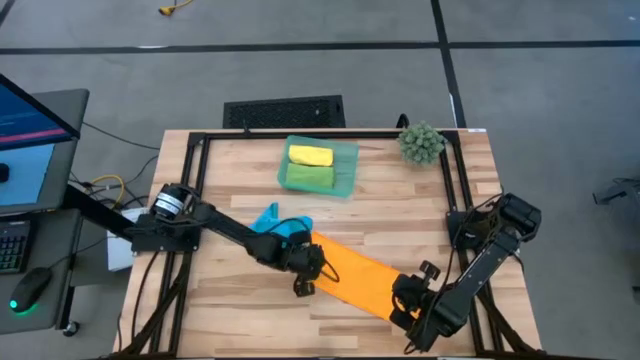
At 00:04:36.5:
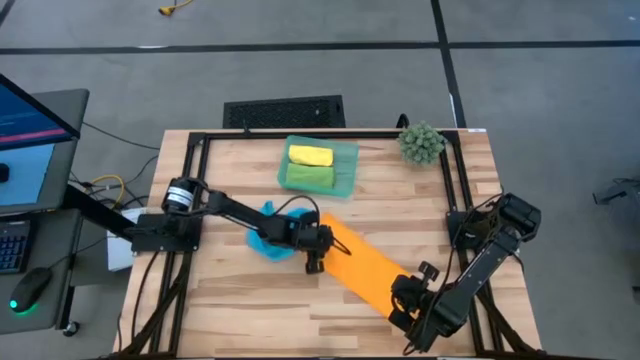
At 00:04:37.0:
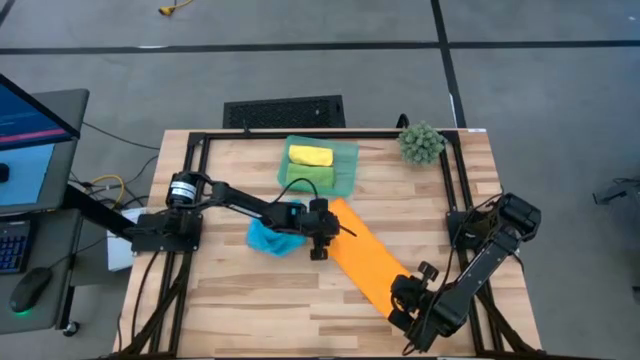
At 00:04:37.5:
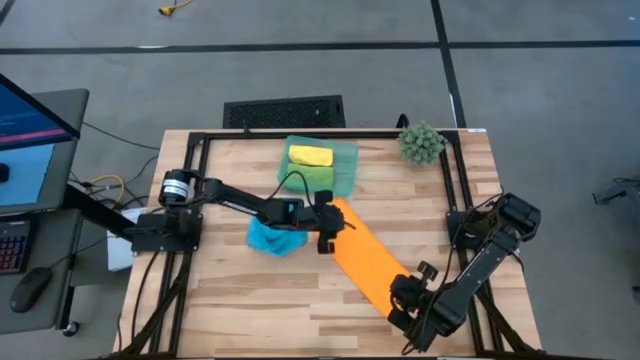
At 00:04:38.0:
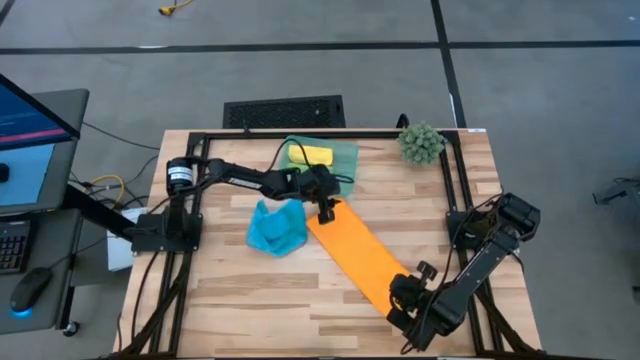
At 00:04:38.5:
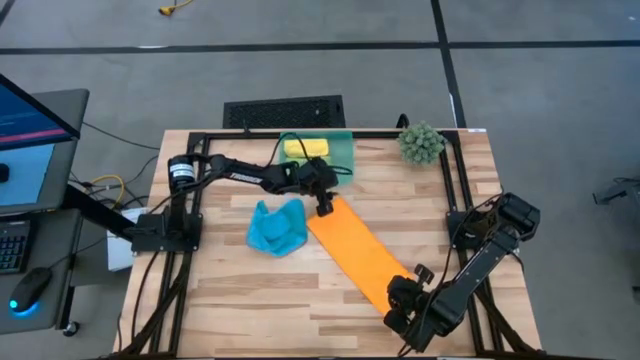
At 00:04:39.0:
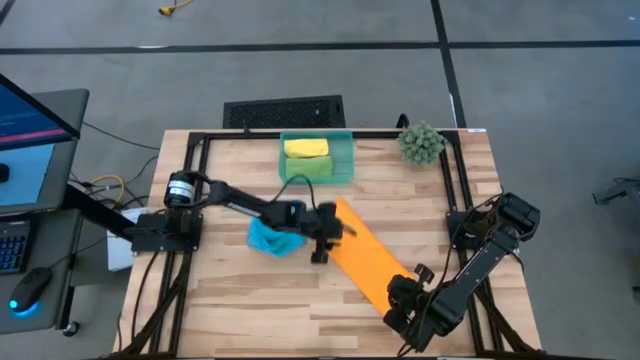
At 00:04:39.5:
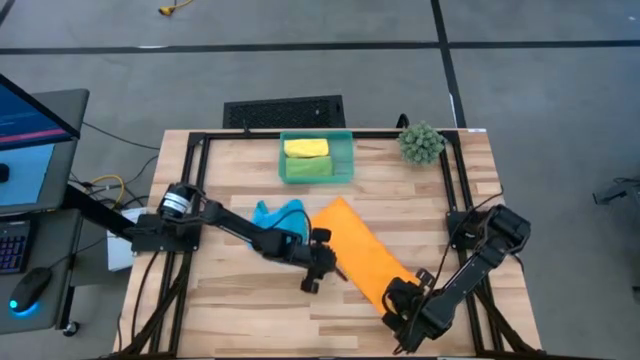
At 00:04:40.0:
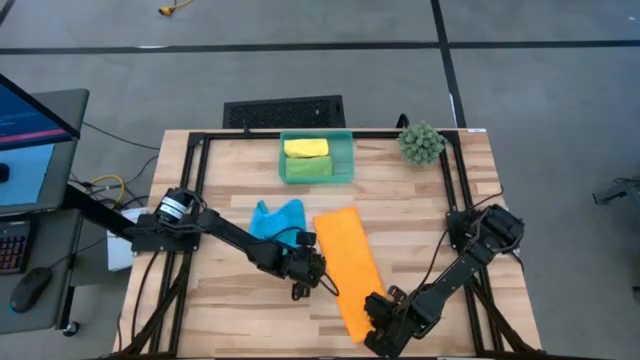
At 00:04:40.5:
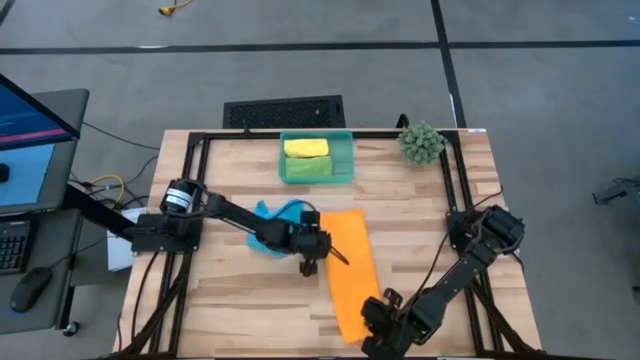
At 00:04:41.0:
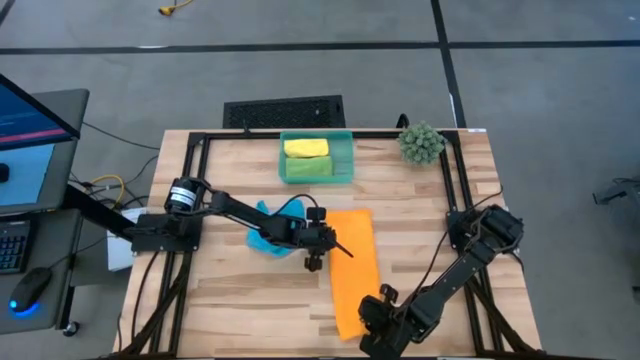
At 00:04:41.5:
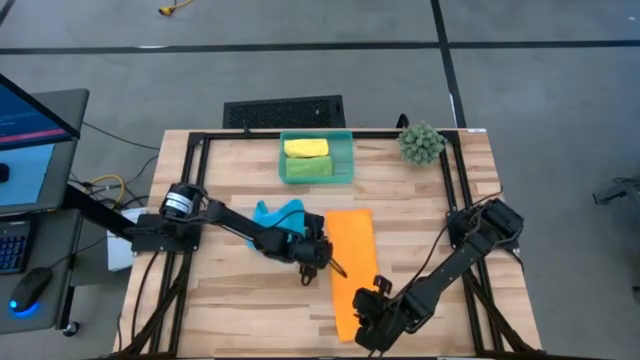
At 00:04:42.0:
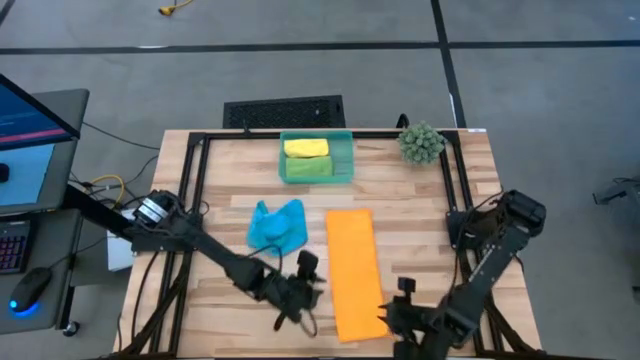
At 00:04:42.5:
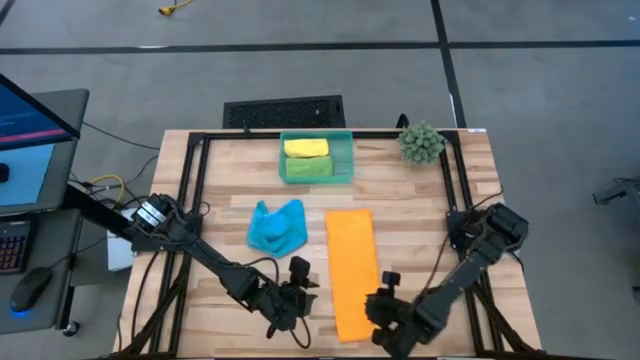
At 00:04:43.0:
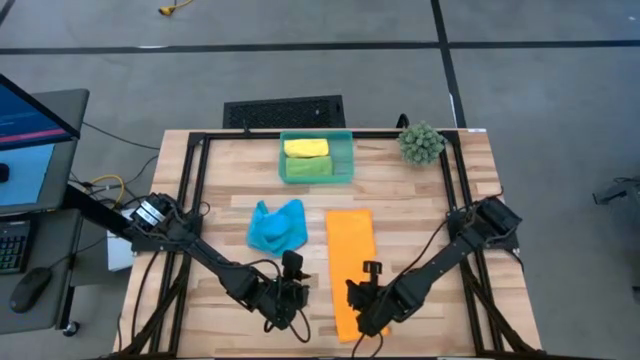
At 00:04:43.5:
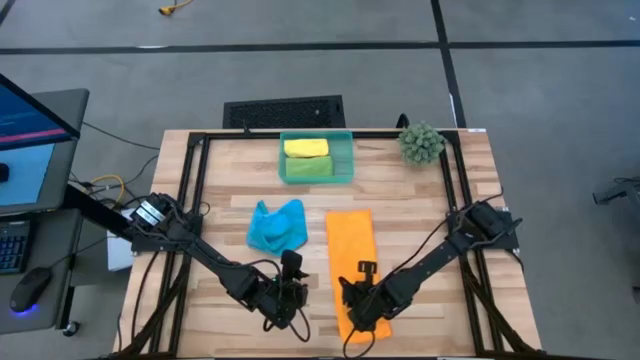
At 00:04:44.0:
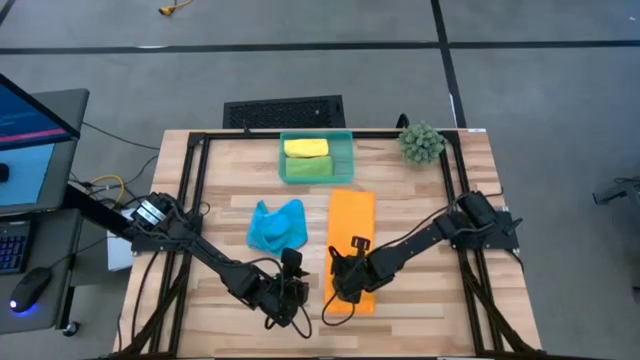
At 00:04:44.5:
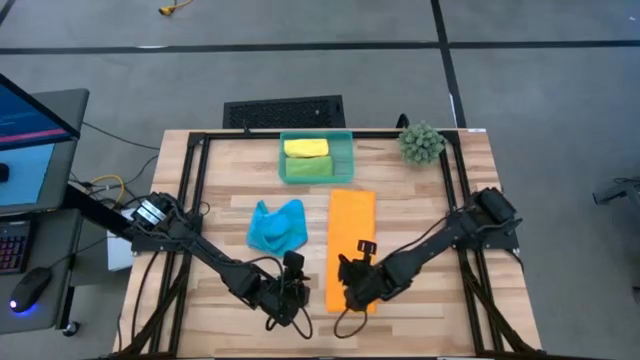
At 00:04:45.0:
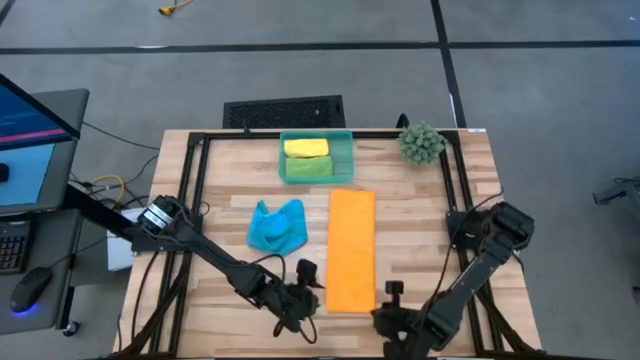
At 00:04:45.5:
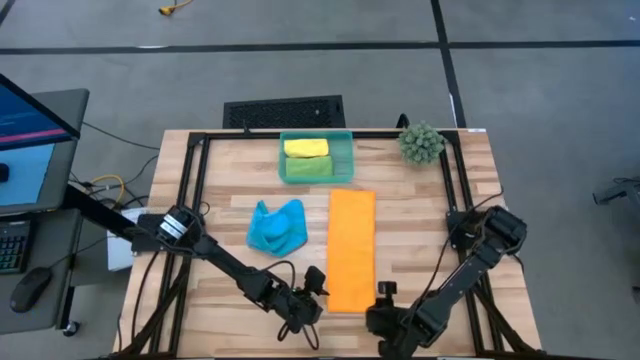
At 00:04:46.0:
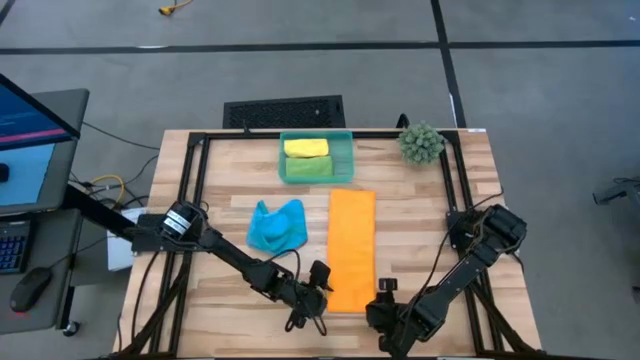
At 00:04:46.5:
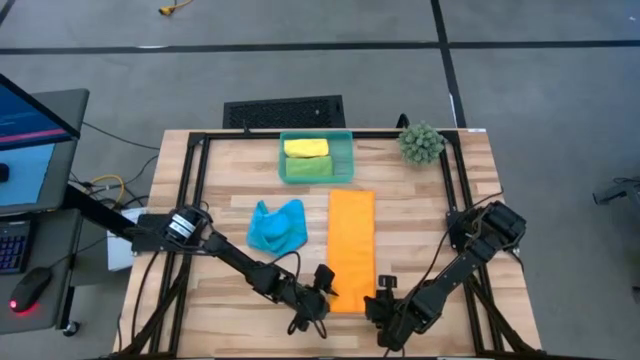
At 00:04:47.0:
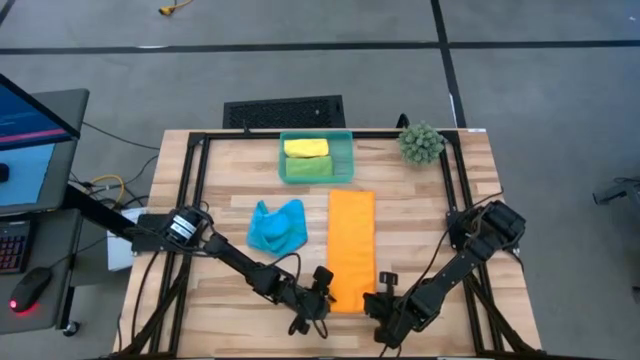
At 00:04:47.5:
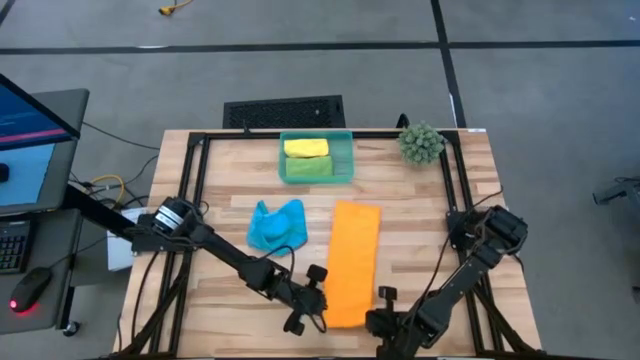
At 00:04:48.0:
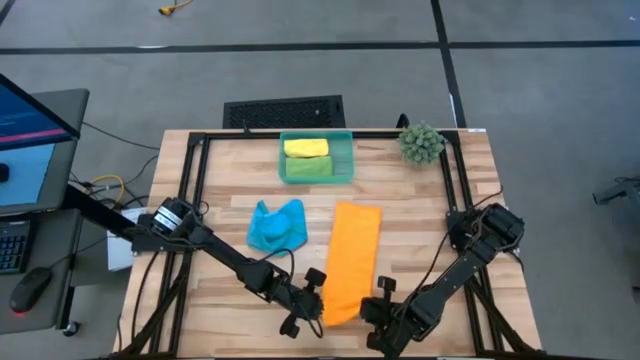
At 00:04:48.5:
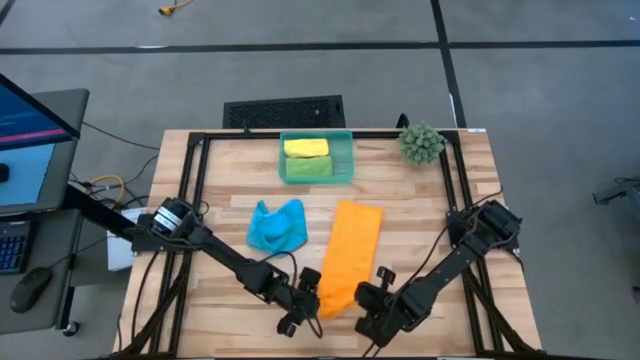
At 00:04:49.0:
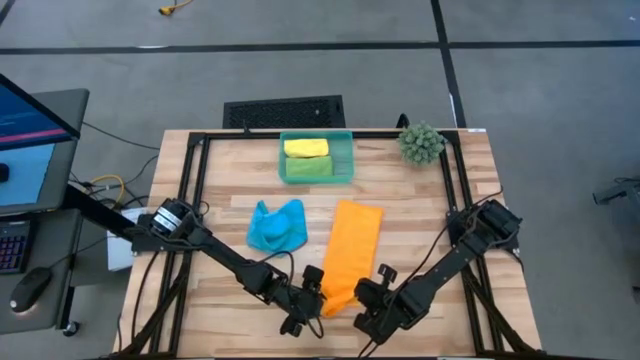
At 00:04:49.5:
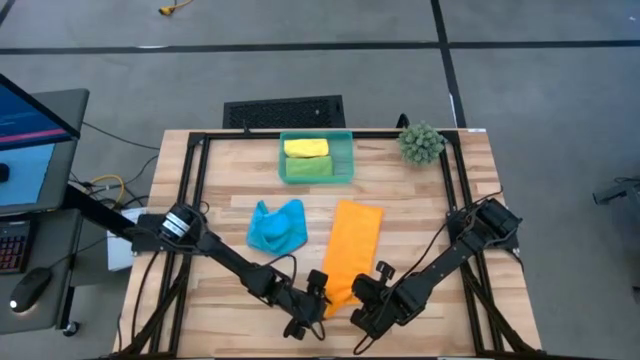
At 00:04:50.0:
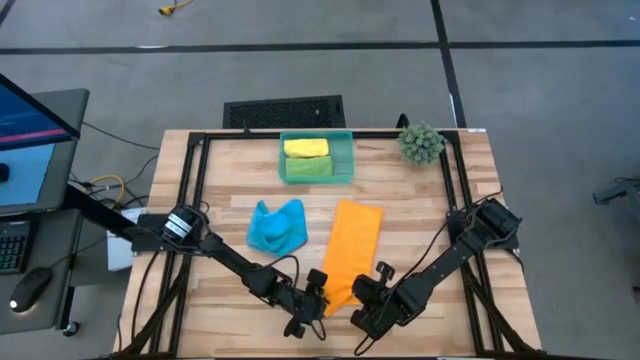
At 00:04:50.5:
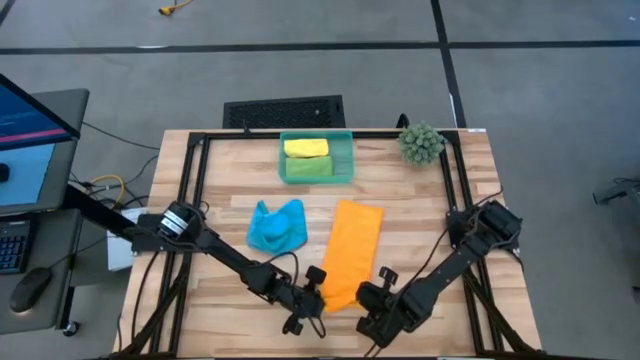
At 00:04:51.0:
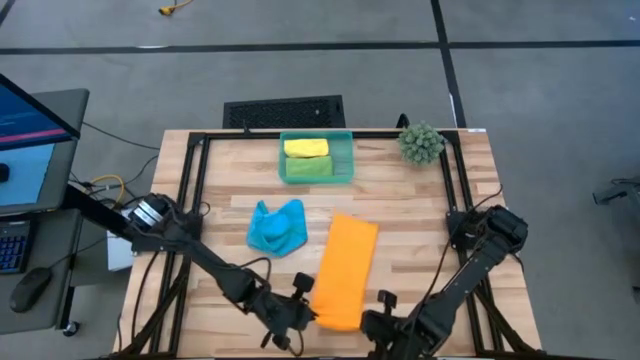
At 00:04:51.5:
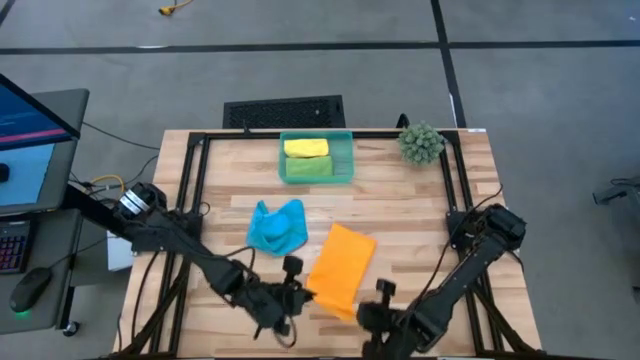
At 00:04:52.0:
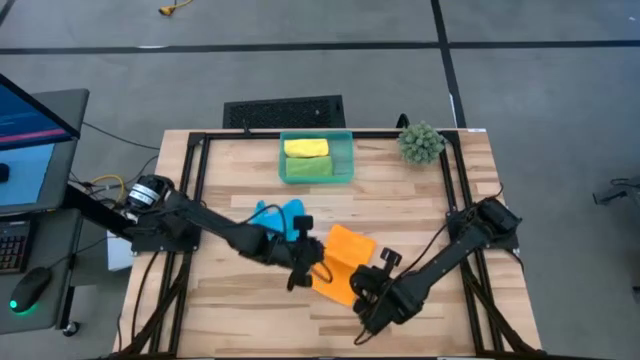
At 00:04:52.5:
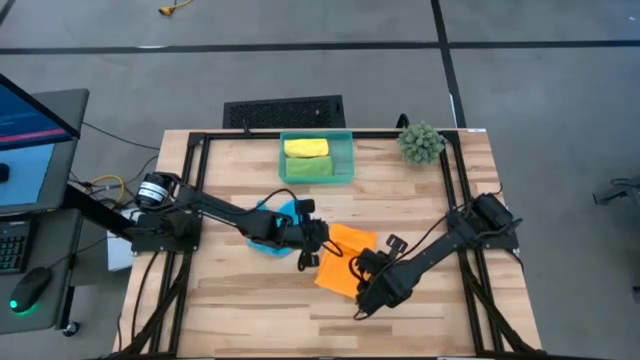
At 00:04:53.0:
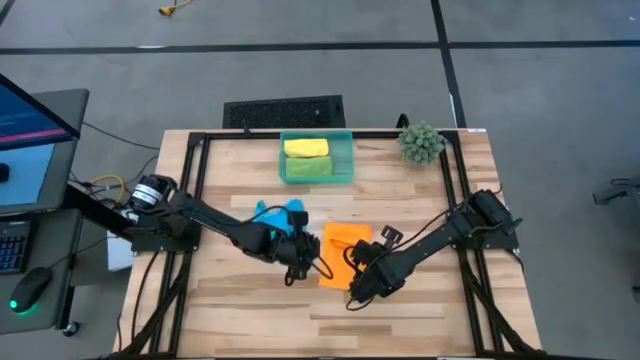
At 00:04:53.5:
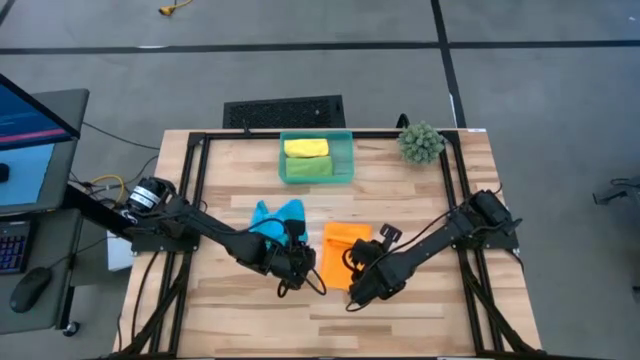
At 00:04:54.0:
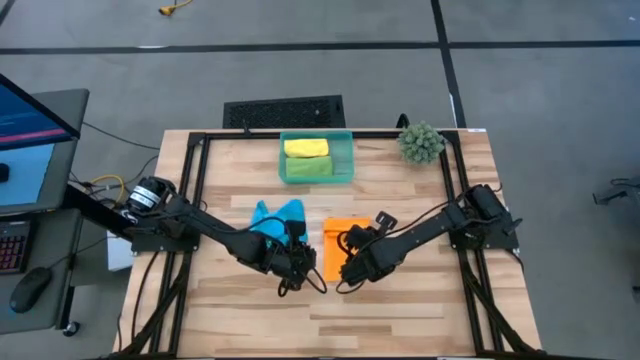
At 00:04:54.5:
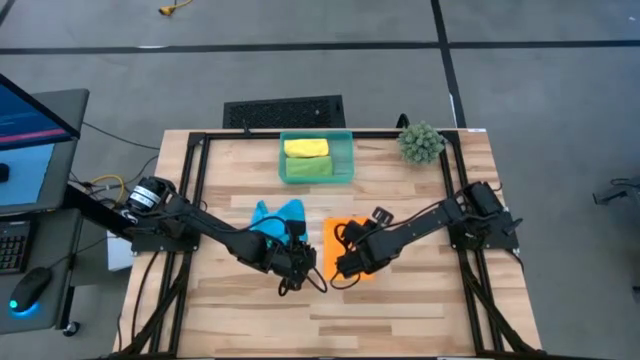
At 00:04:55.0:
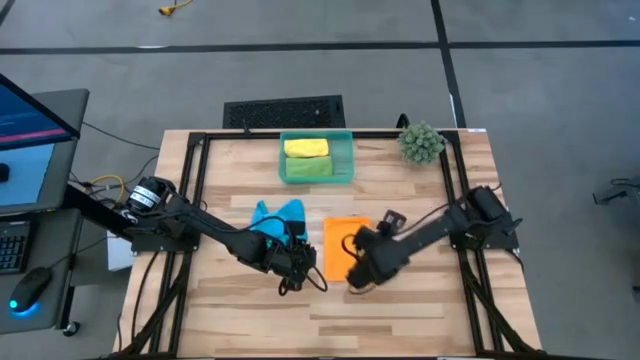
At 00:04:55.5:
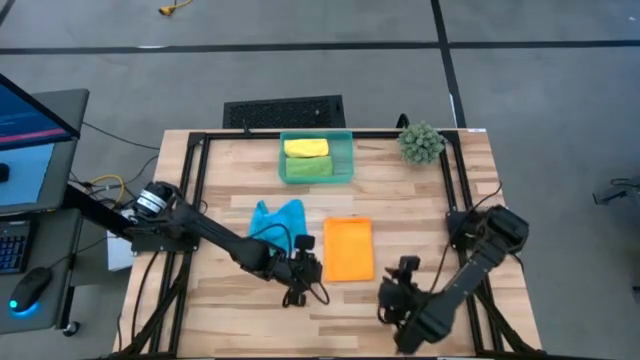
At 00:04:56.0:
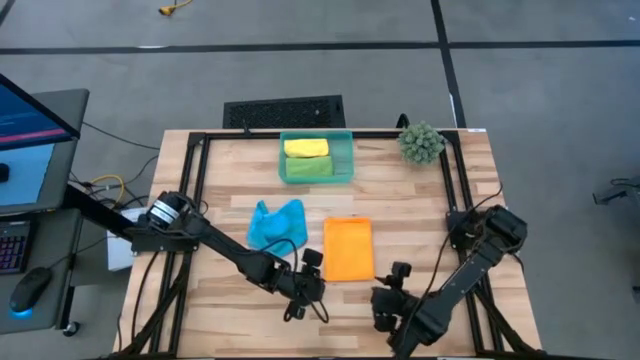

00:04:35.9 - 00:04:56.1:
Task: Roll microfiber towels into tight, uniform cylinder then place into a basket
Roll the orange microfiber cloth
